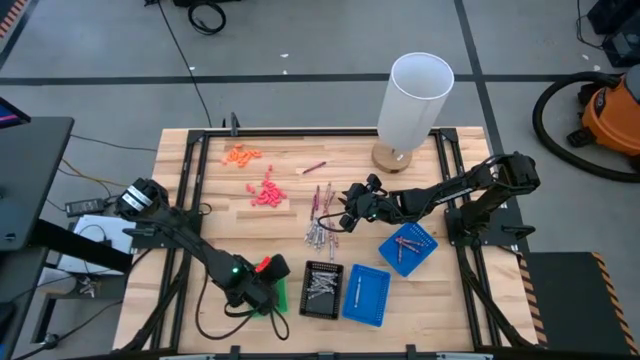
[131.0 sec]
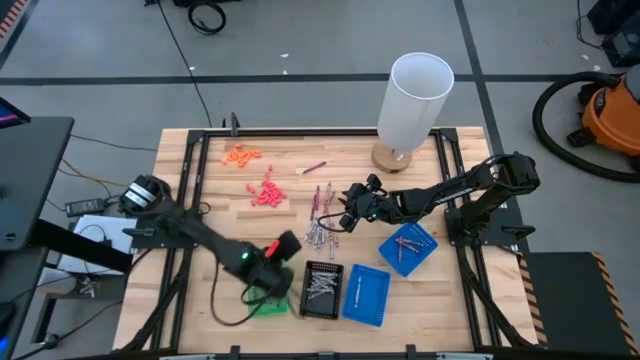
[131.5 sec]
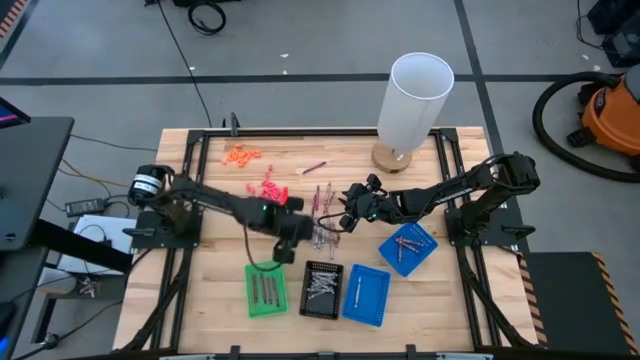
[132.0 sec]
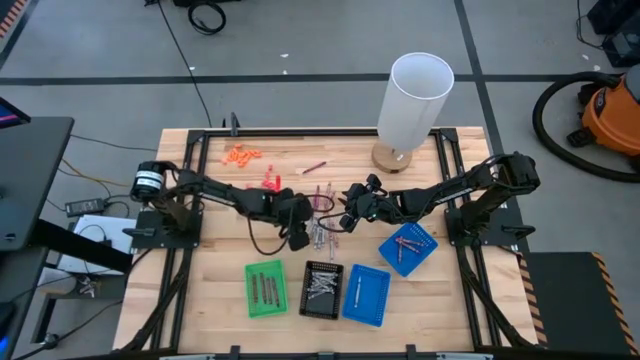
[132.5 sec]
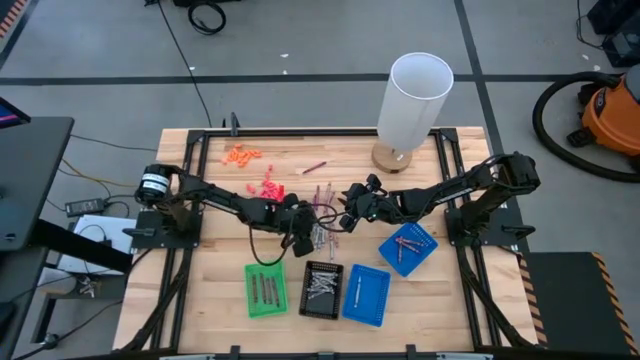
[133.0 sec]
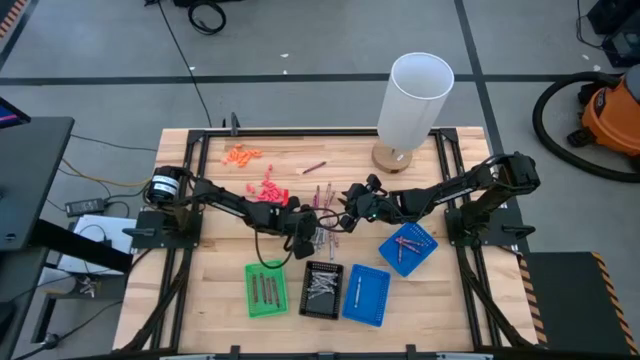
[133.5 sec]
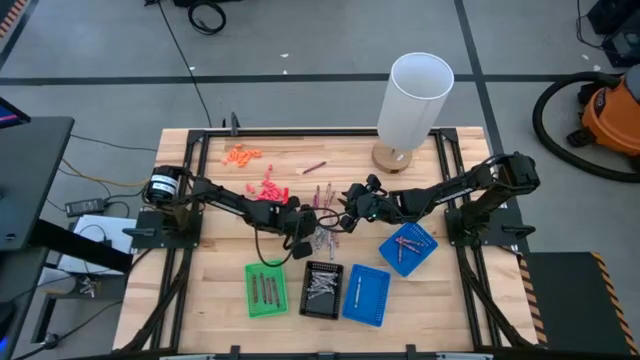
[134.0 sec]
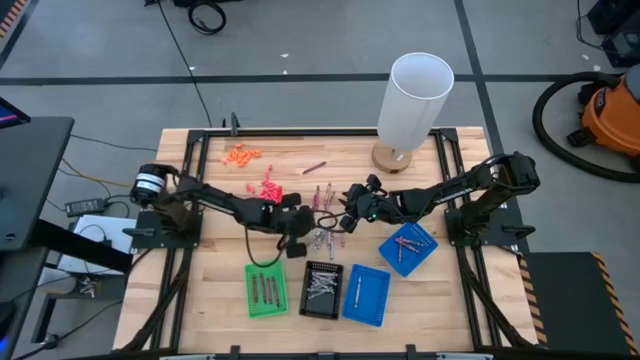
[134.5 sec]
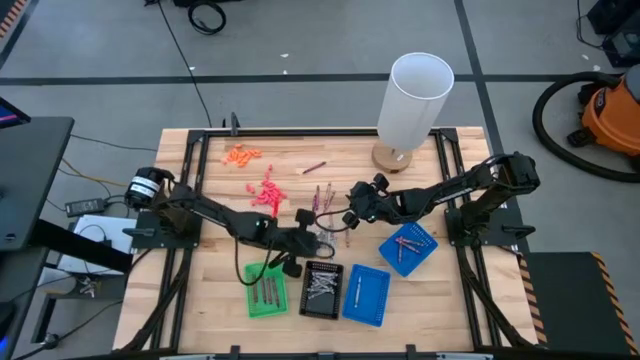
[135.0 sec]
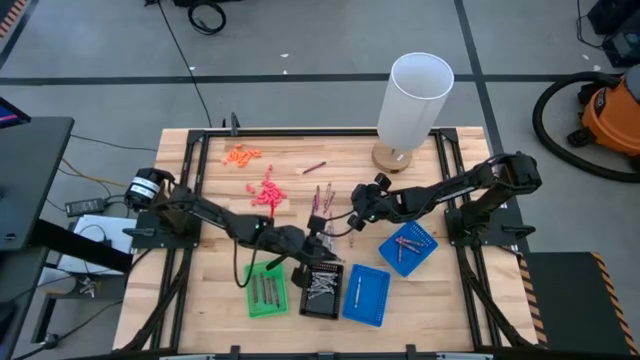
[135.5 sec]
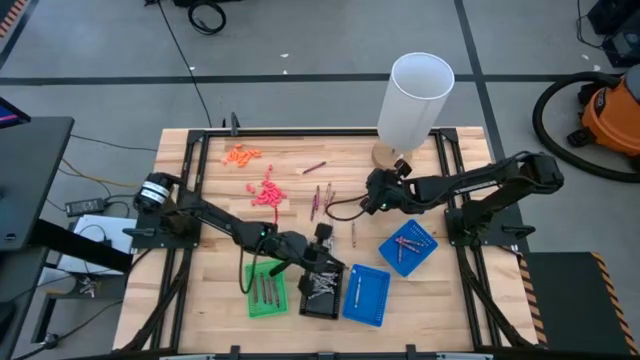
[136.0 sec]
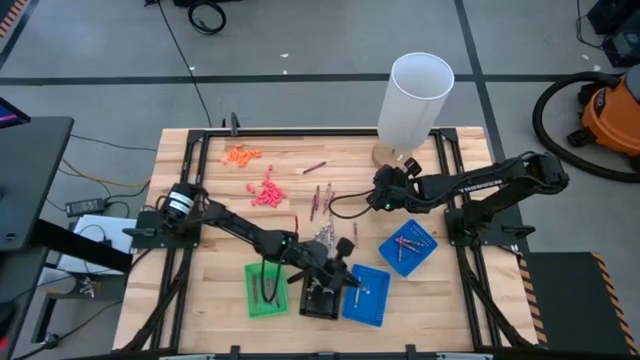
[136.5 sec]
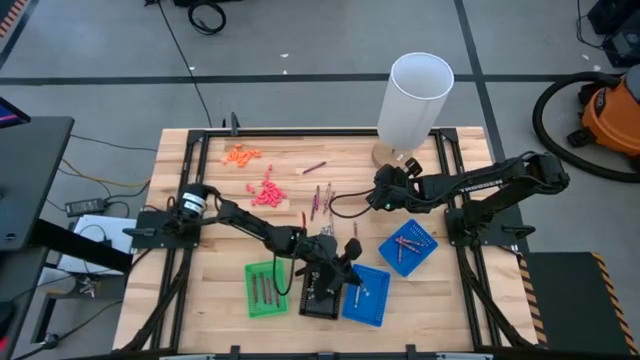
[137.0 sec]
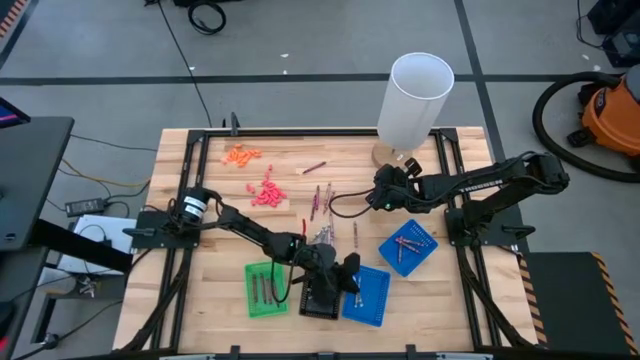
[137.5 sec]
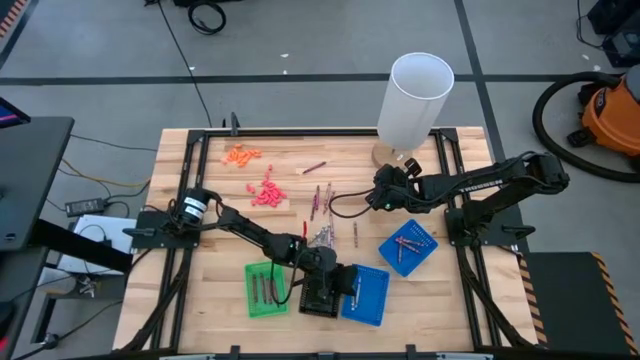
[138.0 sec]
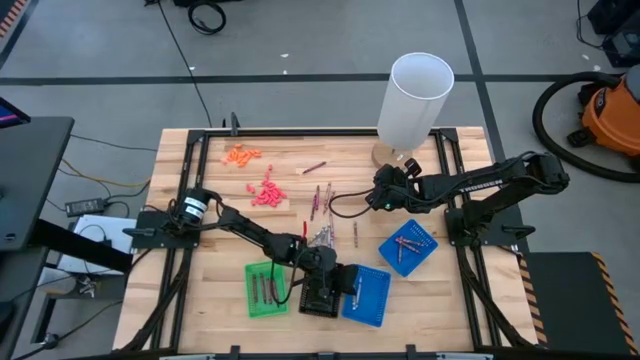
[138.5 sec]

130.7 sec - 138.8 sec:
Task: Sort crayons
Put the white crayon into the left blue basket

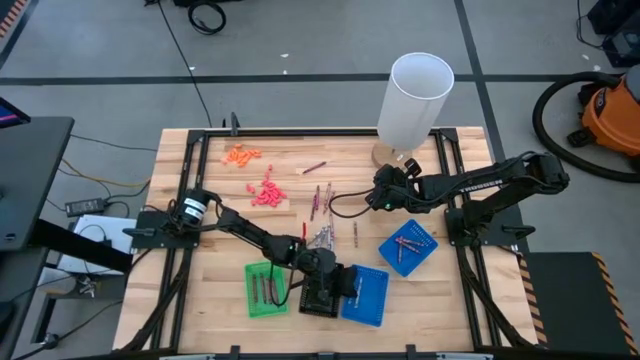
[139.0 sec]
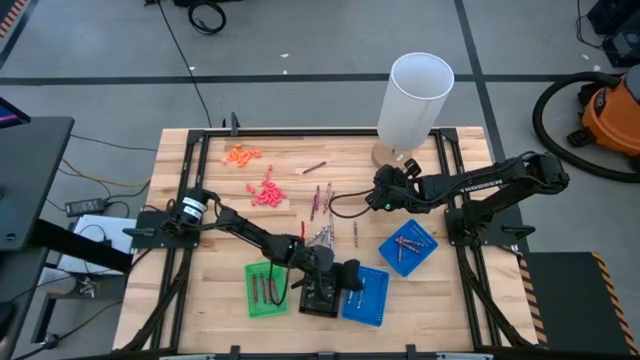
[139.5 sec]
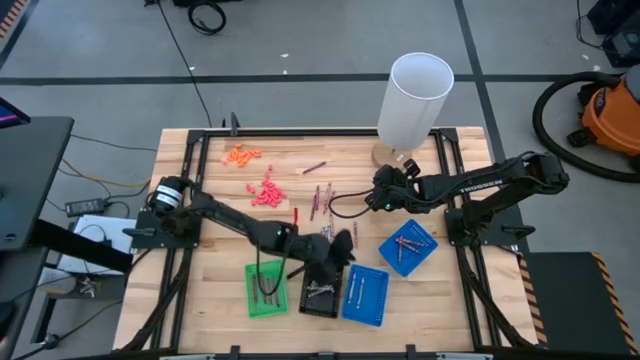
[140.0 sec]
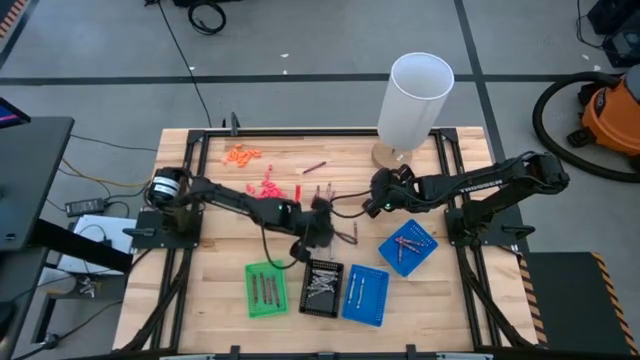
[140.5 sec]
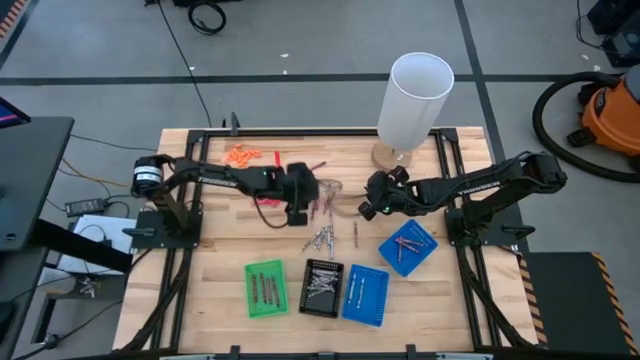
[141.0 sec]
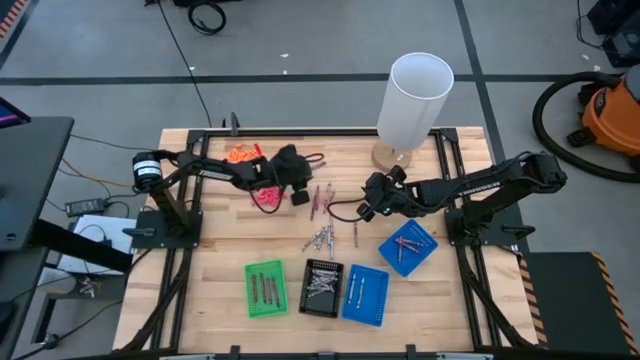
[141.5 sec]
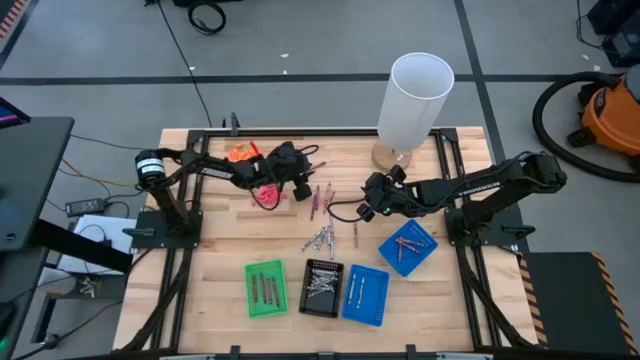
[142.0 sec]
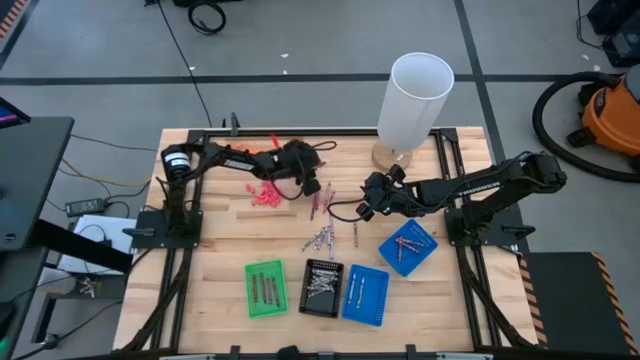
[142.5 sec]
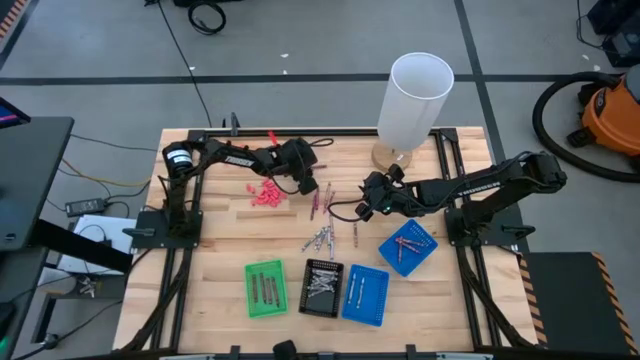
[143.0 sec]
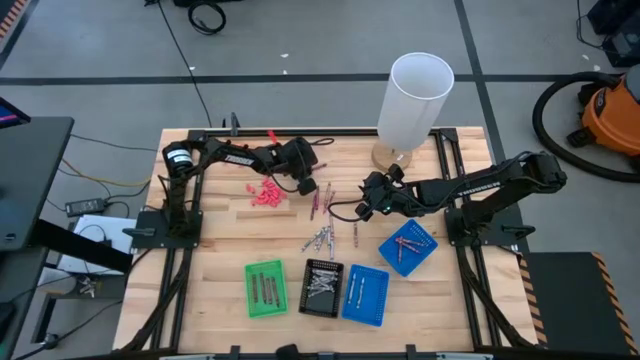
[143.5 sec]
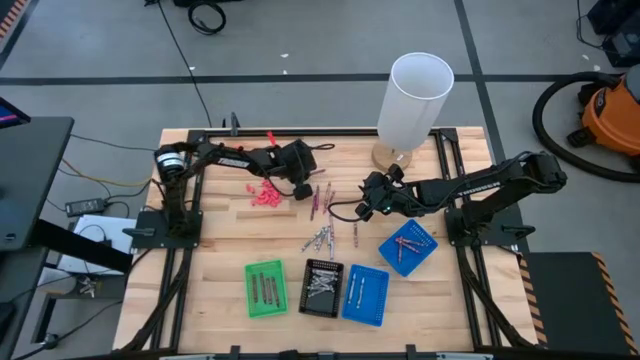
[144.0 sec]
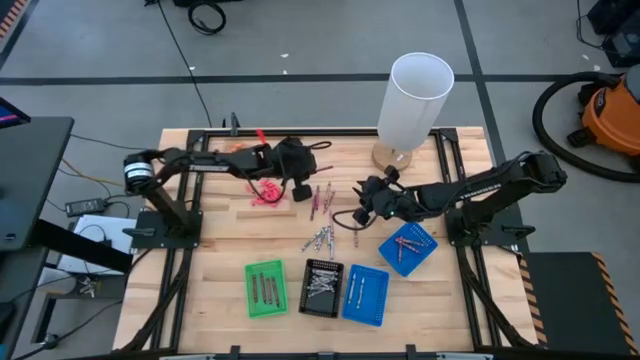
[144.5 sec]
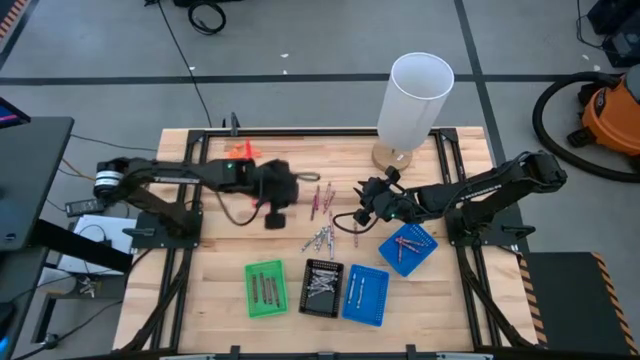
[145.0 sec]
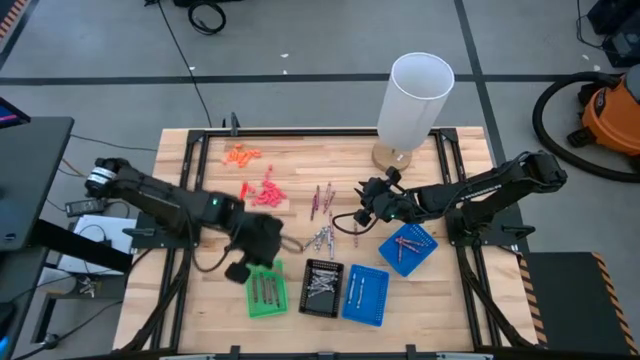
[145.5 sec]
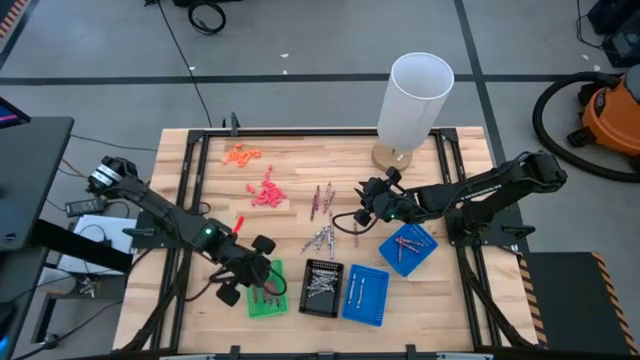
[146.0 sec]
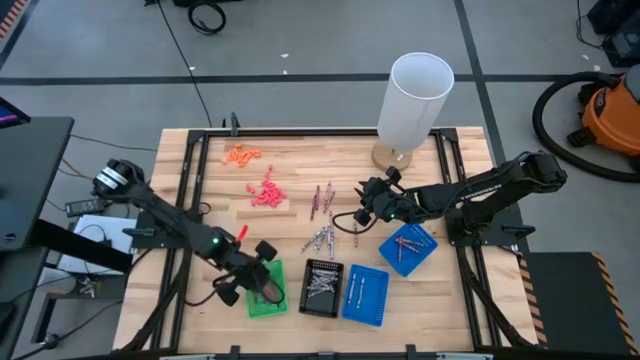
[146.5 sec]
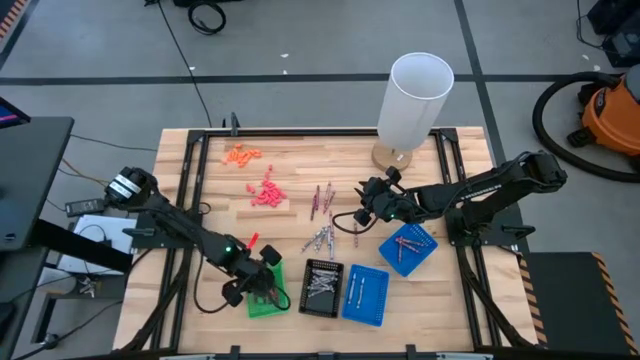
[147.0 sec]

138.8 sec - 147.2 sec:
Put the red crayon into the green basket

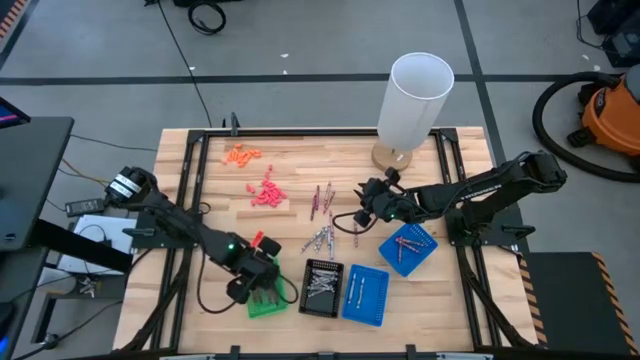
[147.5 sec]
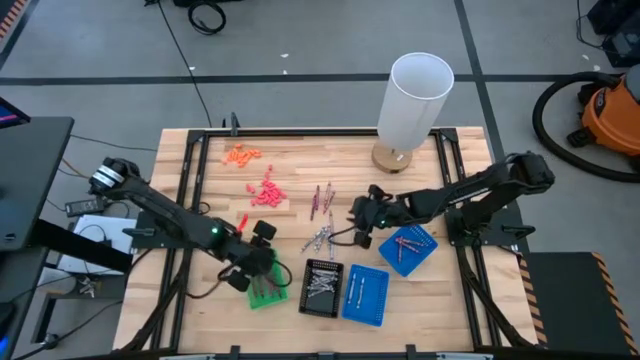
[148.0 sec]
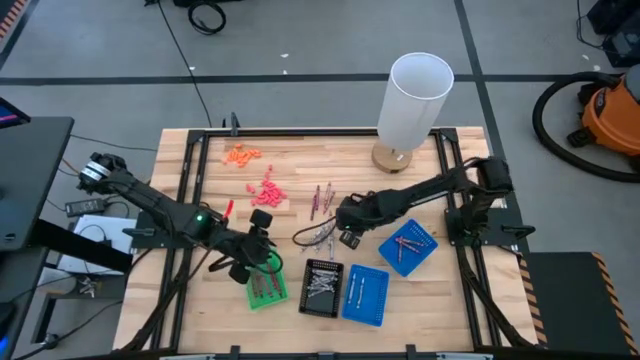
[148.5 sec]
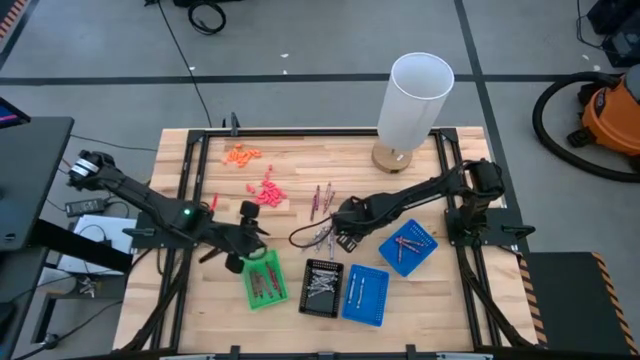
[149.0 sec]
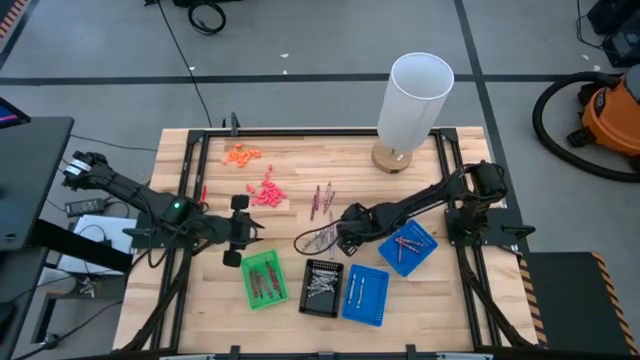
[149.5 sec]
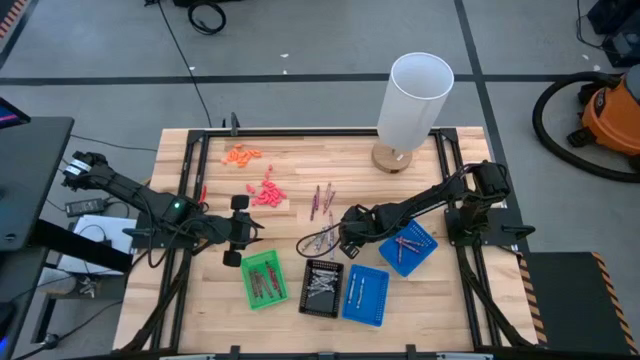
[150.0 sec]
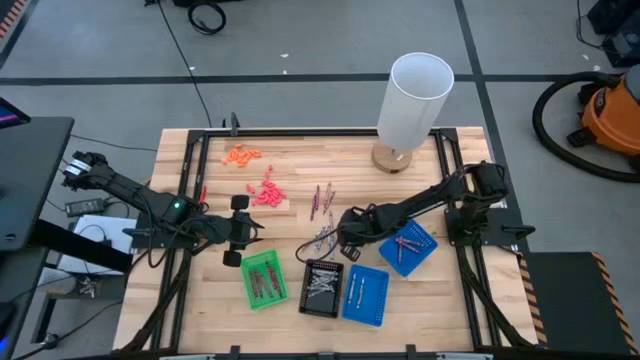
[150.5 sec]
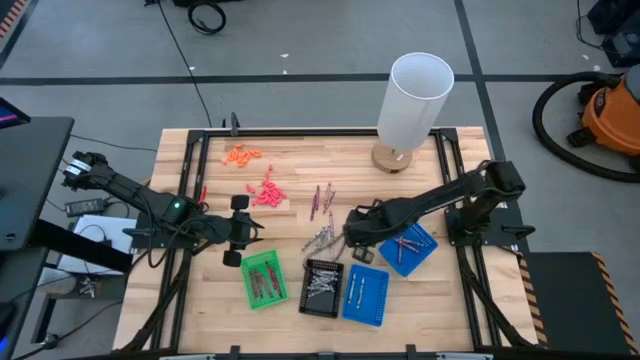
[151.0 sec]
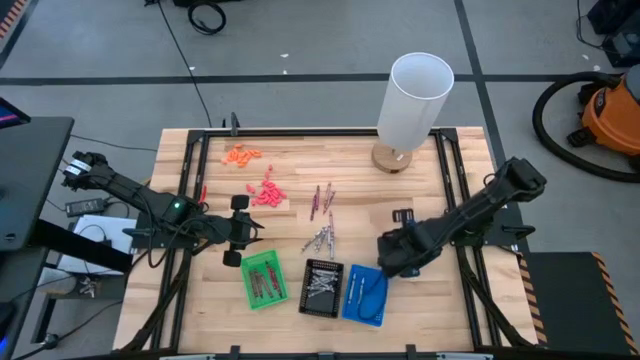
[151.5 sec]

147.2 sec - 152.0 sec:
Put the pink crayon into the right blue basket

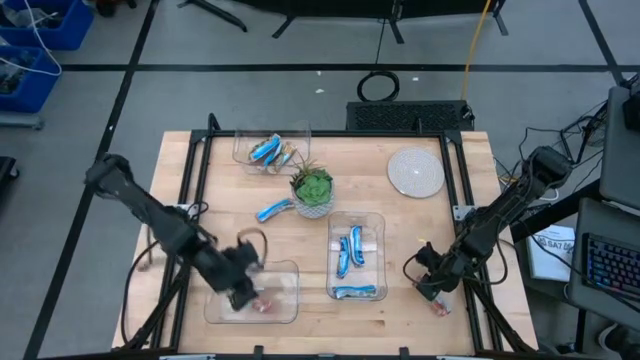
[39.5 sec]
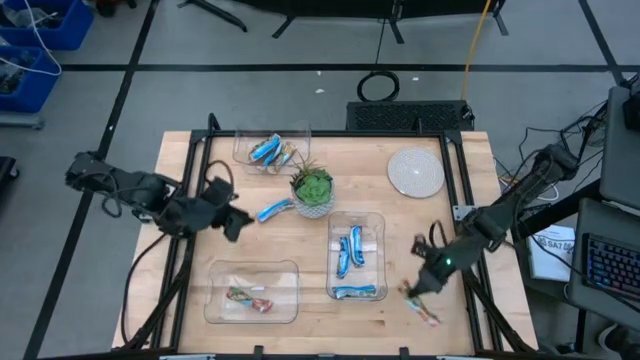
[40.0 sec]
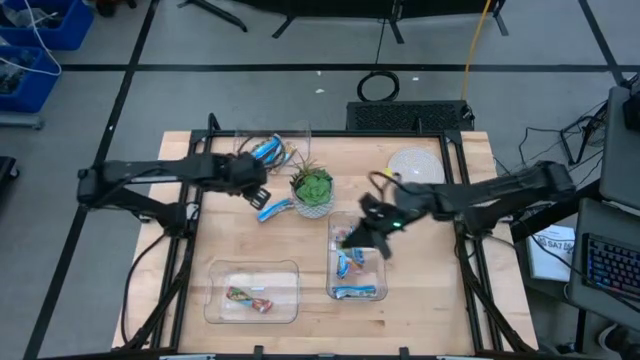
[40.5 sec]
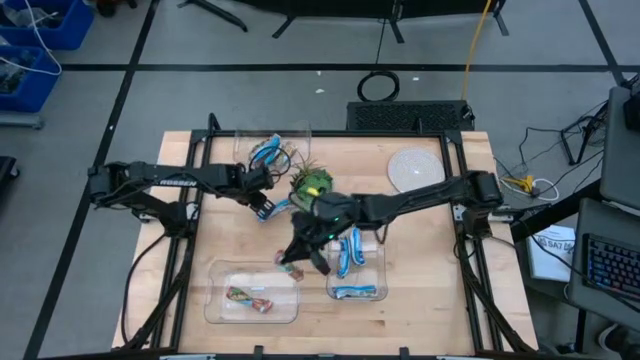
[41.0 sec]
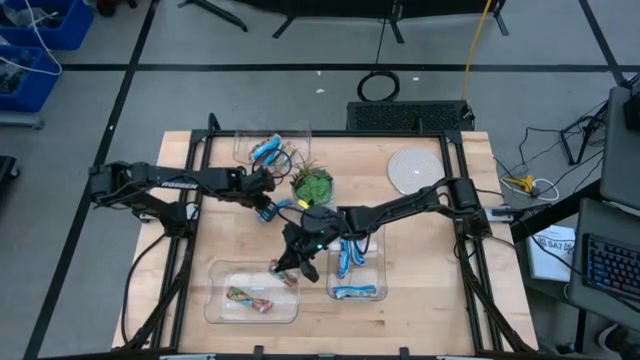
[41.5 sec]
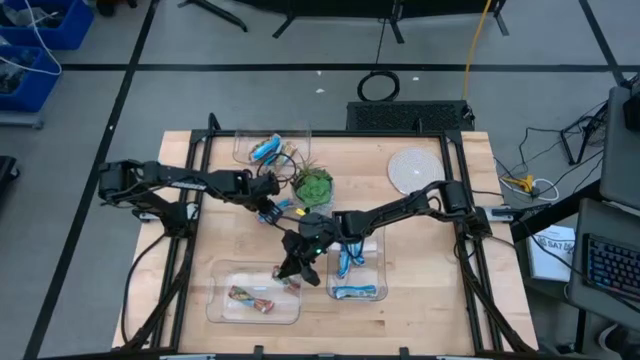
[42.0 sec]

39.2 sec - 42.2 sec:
Task: Pick and place Granola Bars by type
Put the bottom red granola bar into the bottom transparent bin
